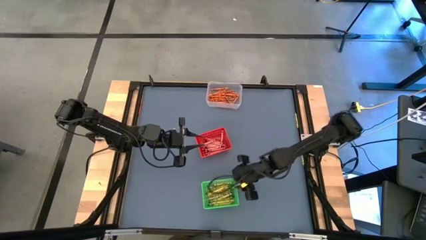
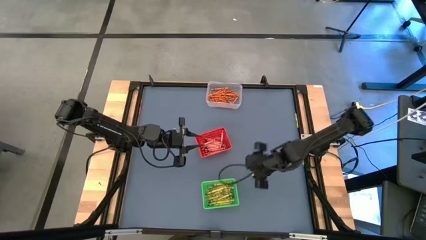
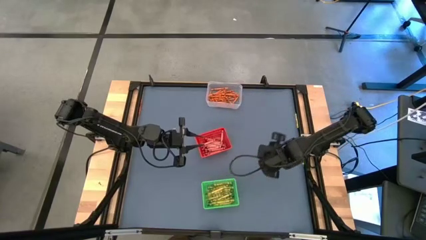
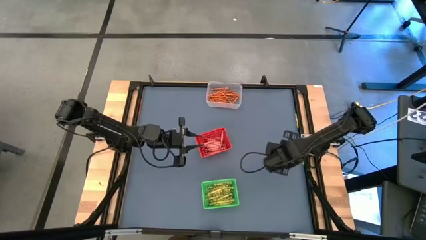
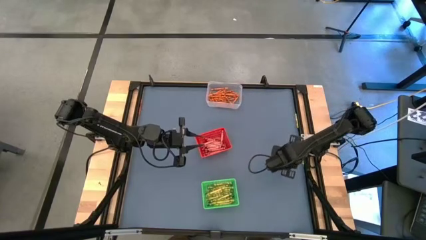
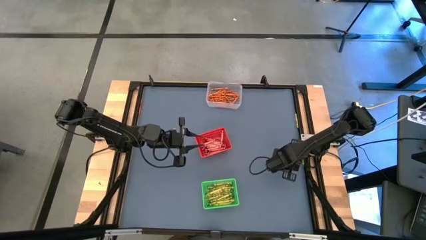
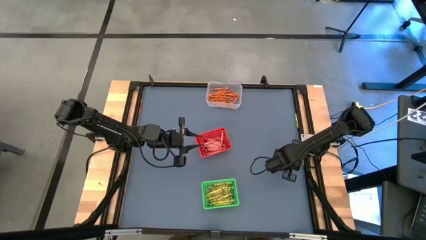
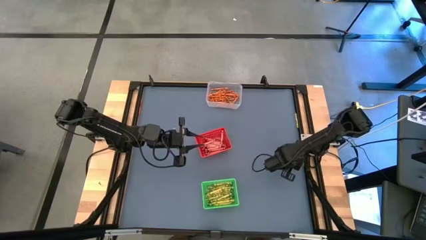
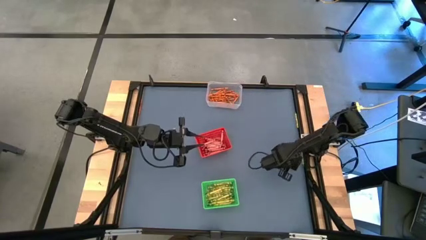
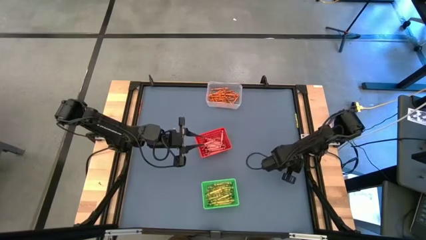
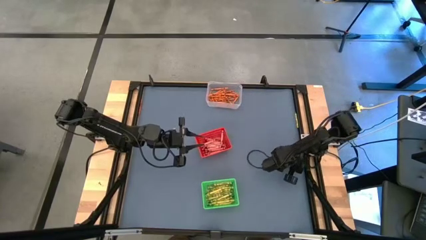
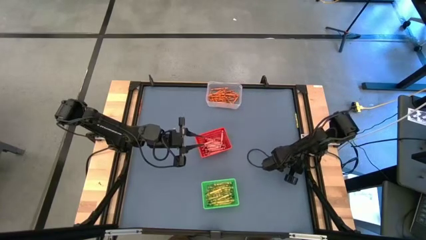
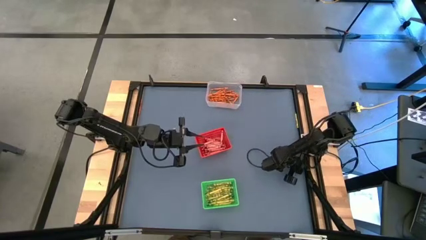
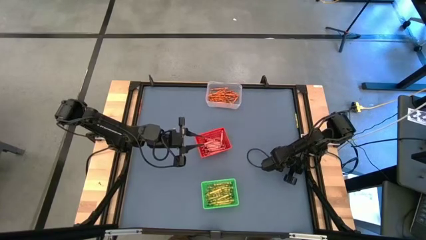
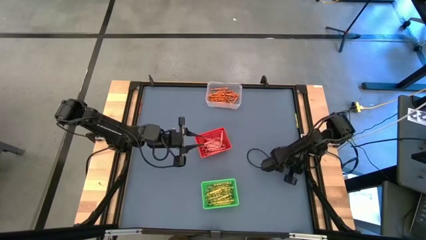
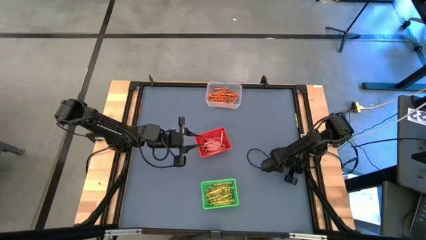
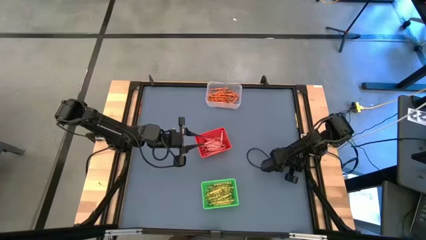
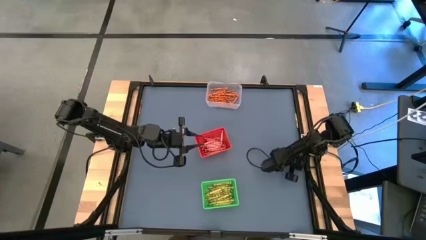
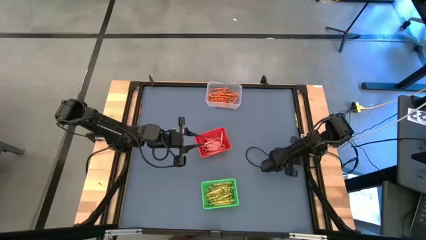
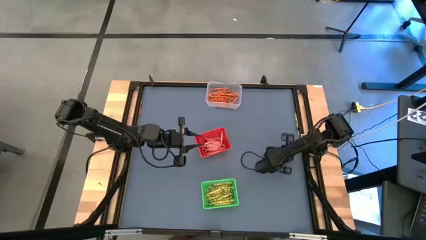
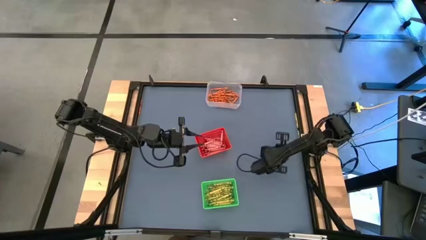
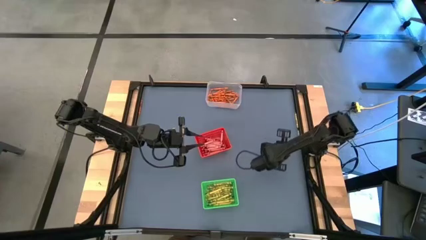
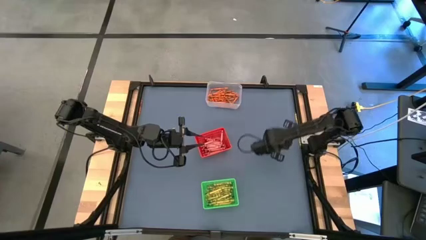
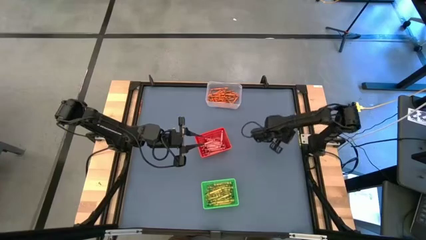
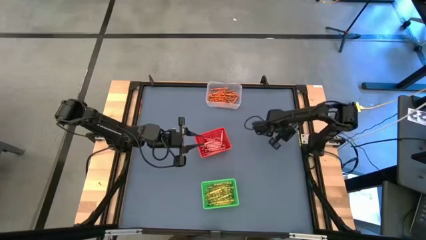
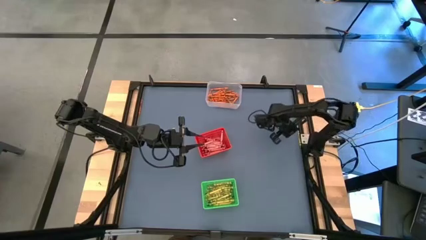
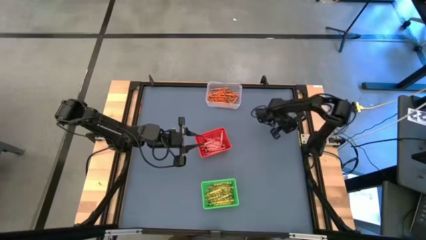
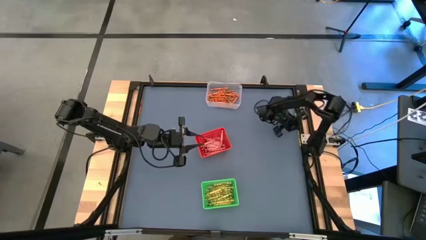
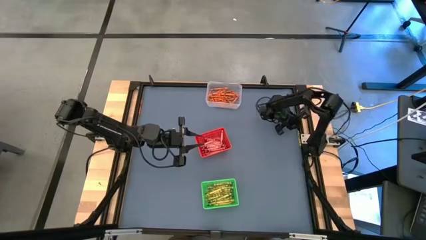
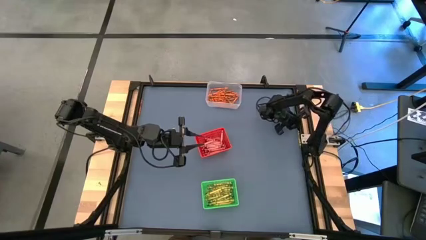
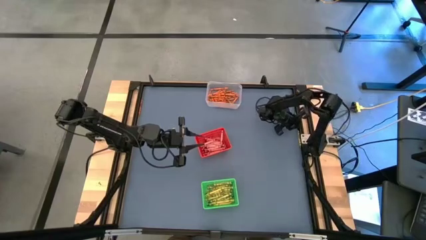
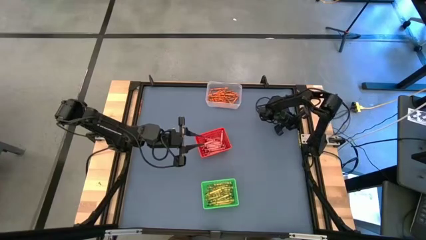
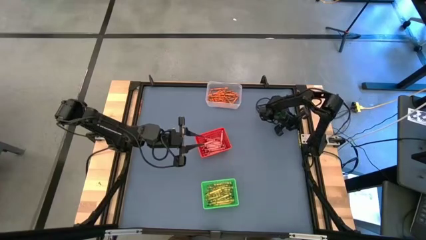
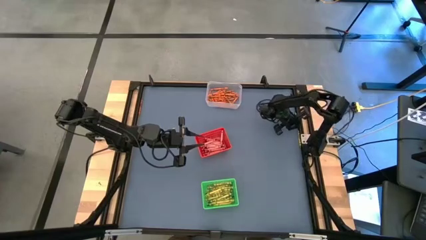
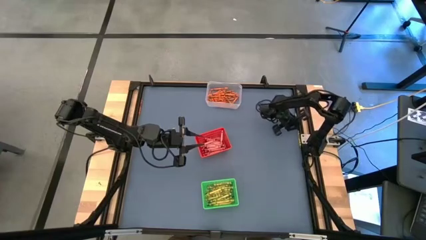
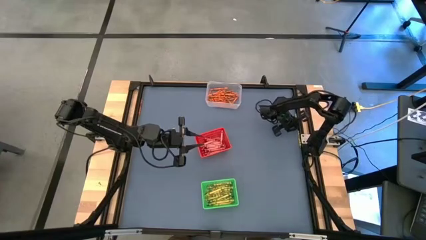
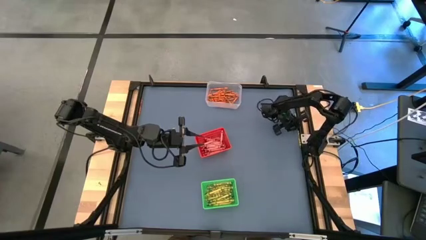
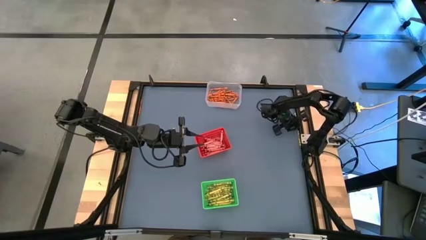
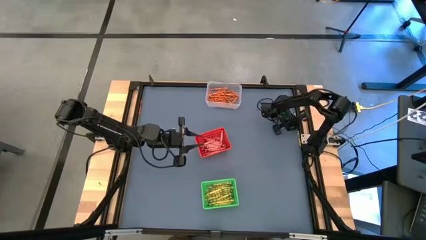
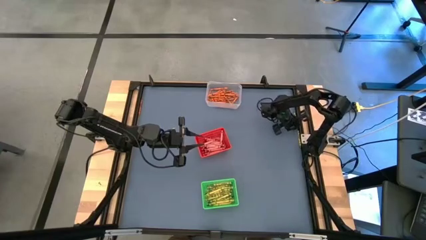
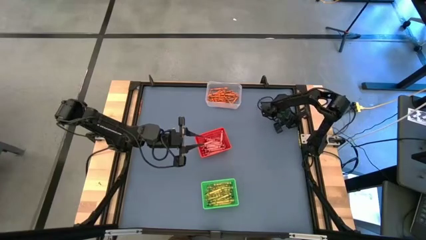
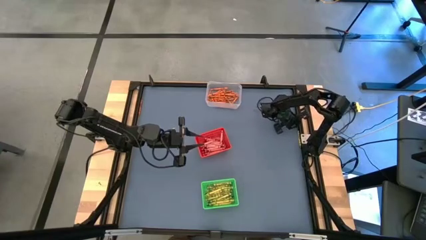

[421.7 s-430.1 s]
Task: Sort crayons
Put the green crayon into the green bin

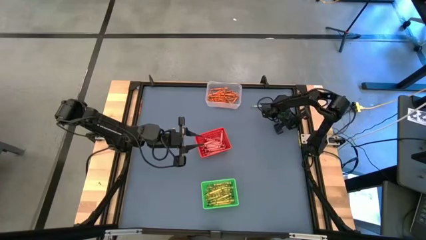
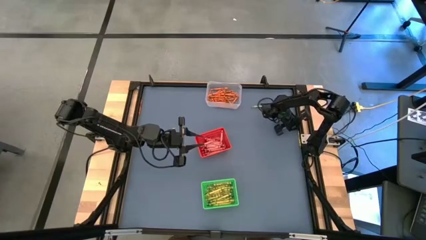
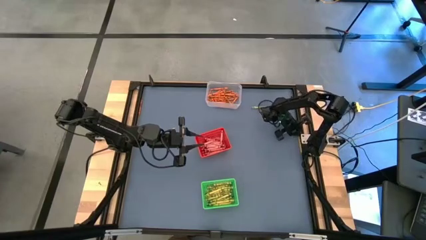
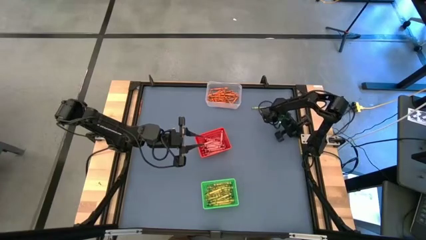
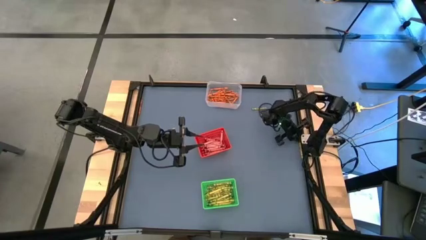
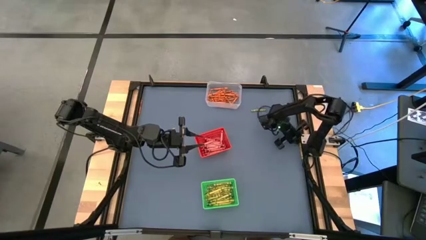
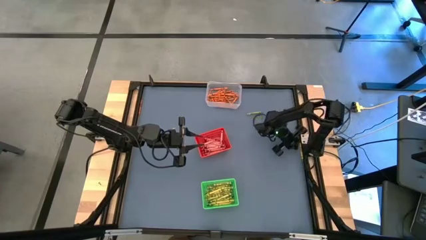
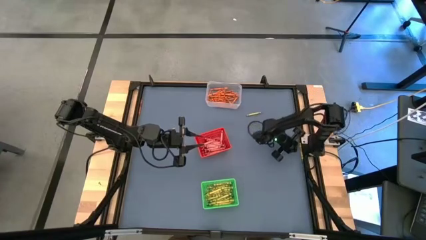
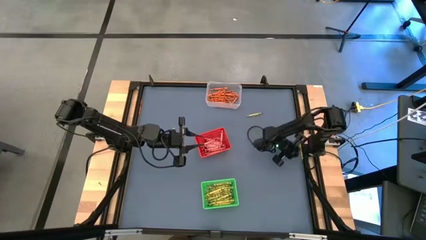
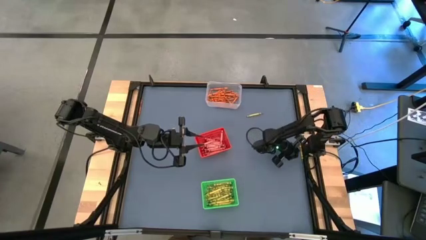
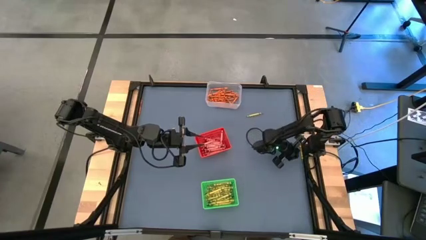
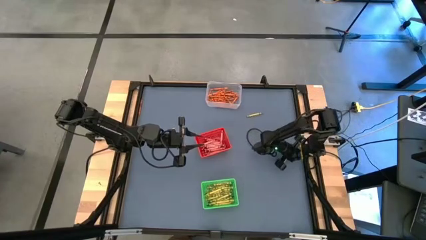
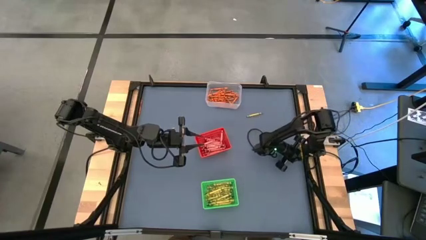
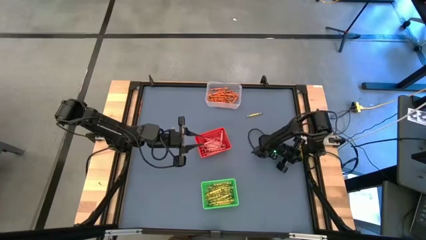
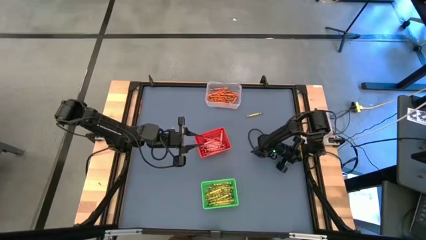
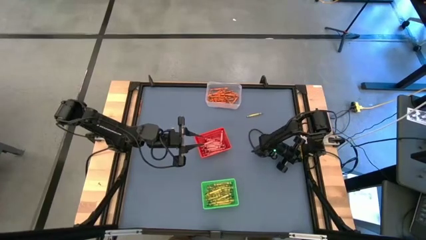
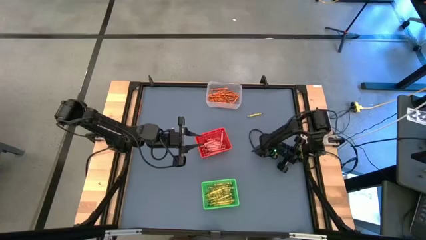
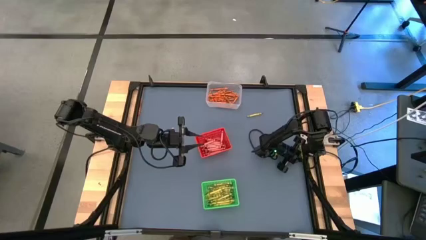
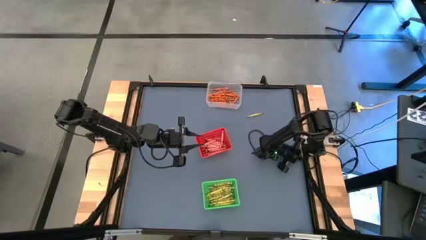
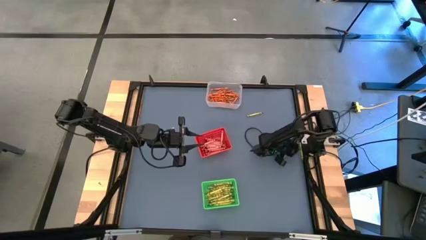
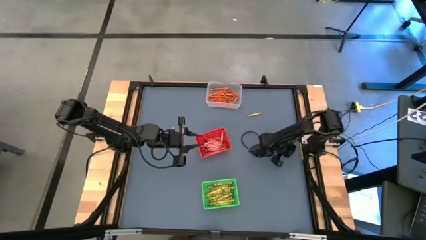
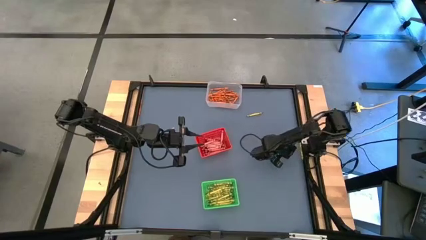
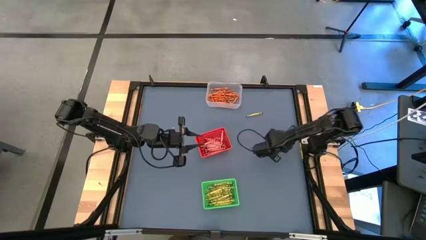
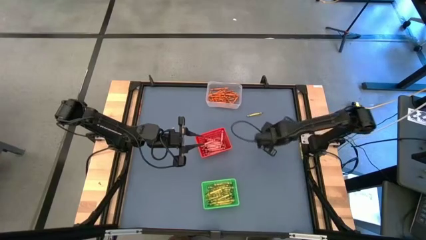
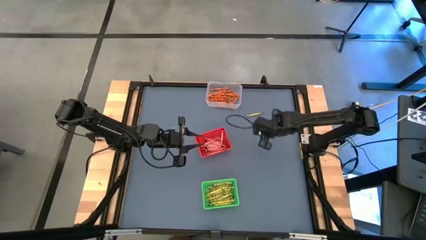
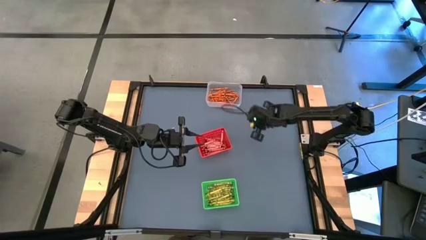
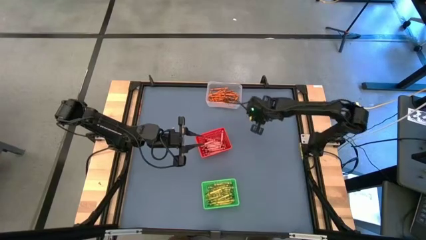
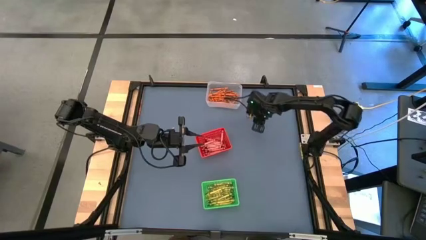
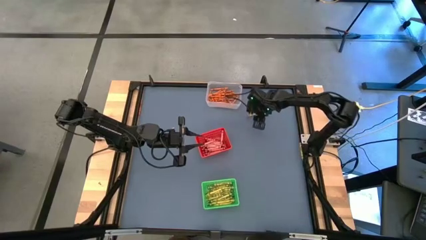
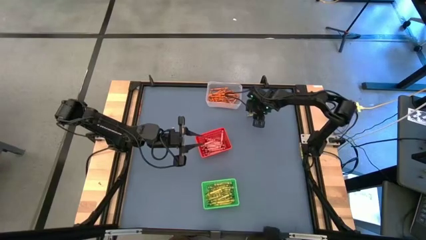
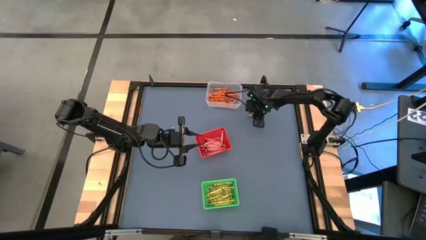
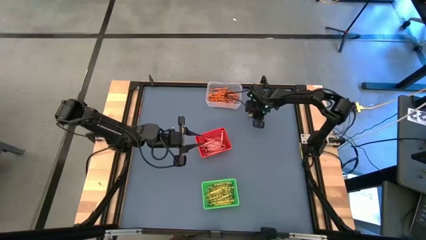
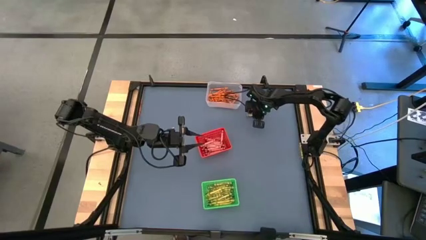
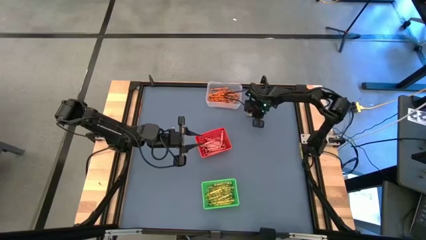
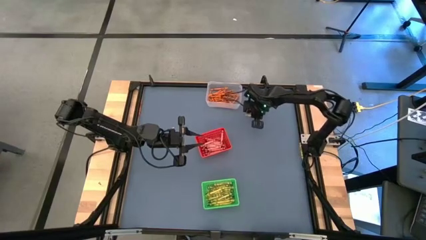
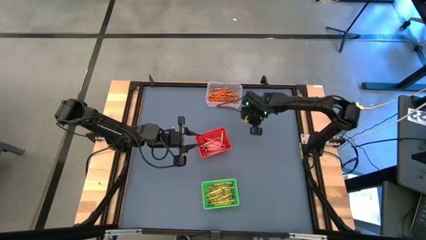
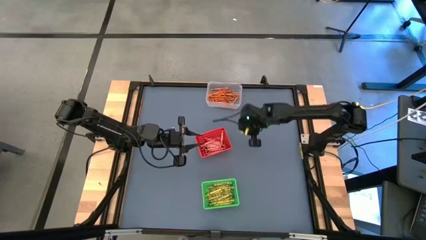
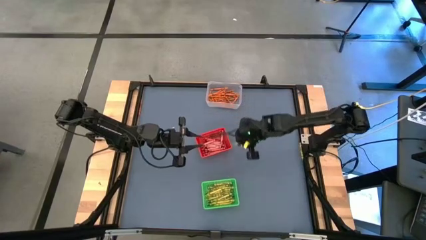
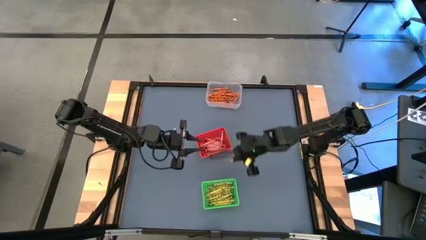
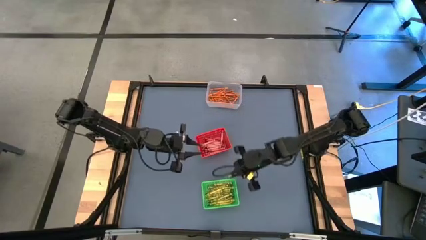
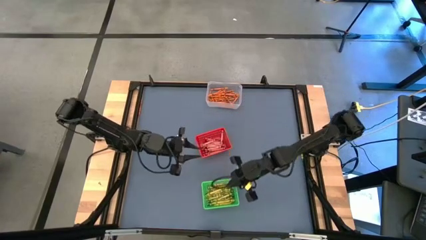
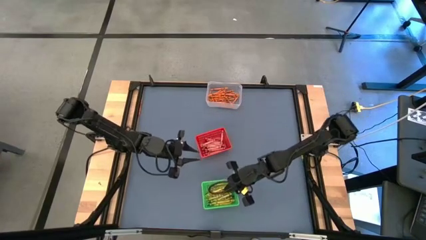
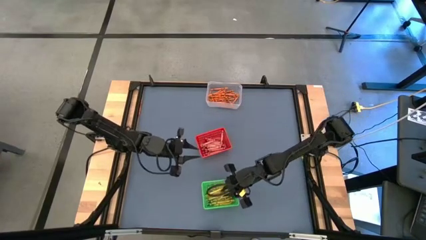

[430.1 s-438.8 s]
Put the green crayon into the green bin
